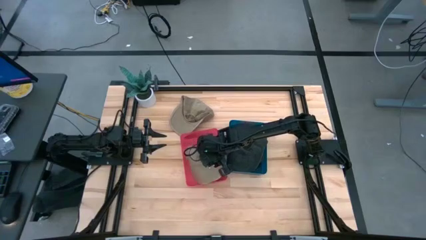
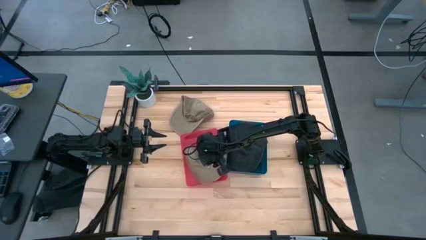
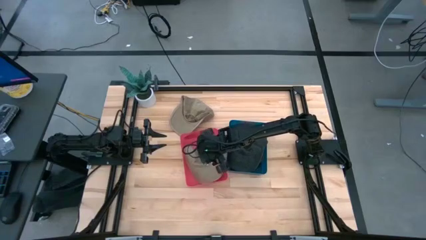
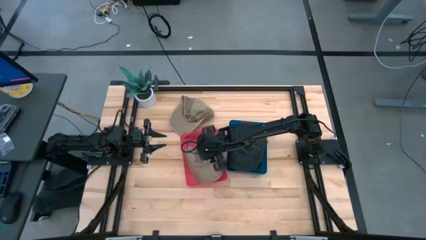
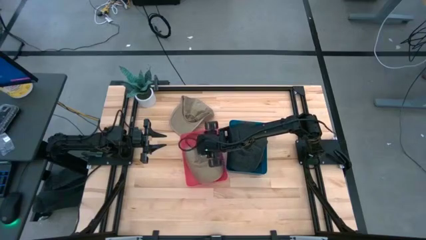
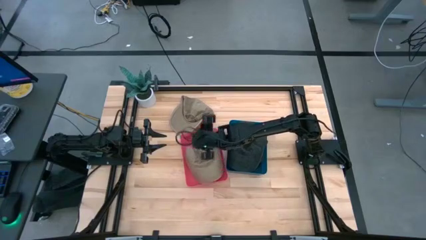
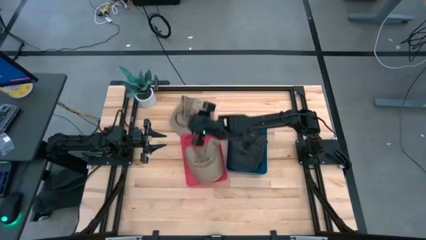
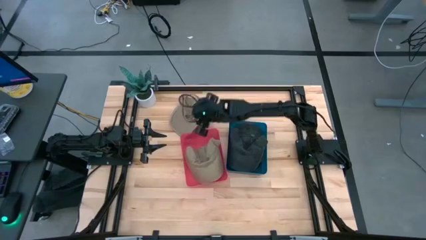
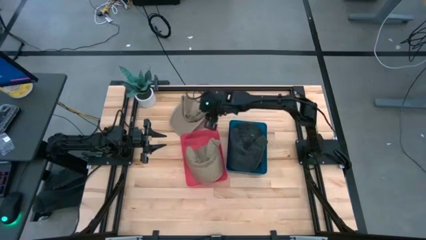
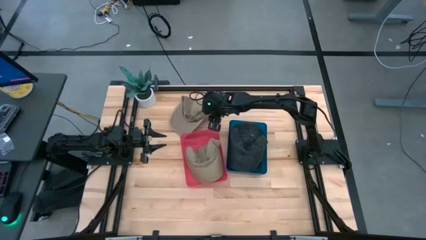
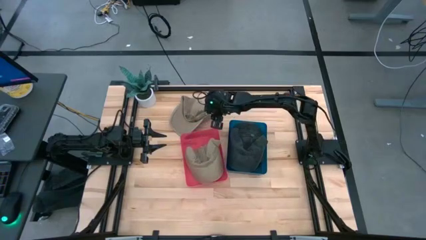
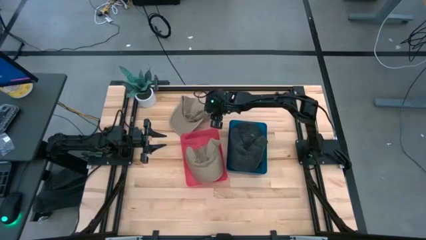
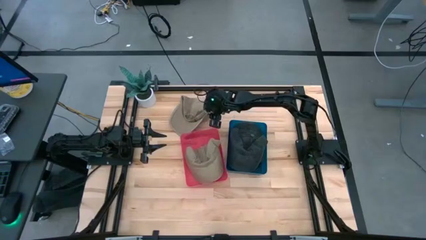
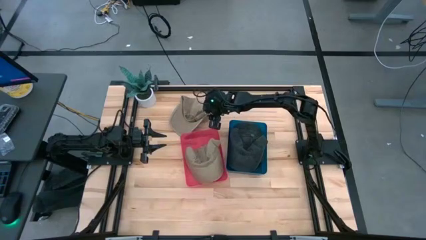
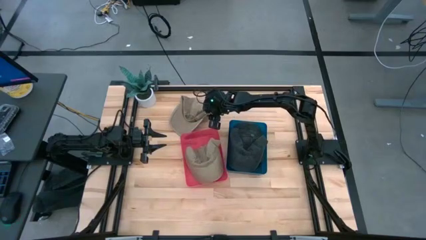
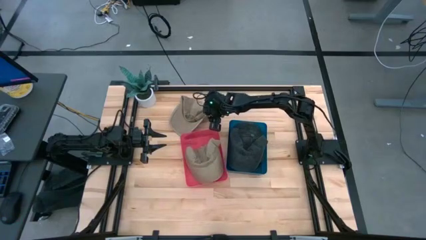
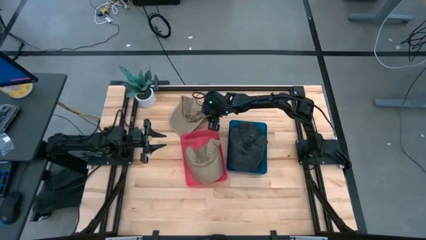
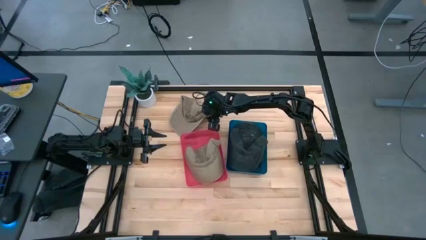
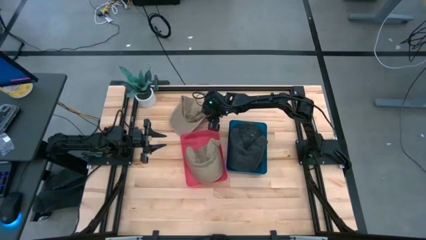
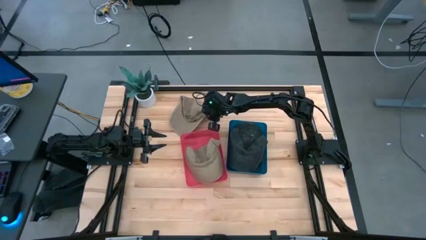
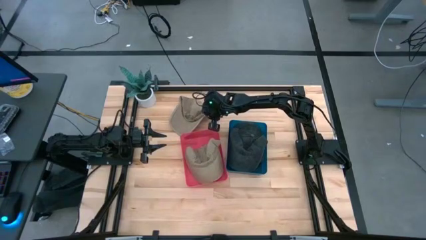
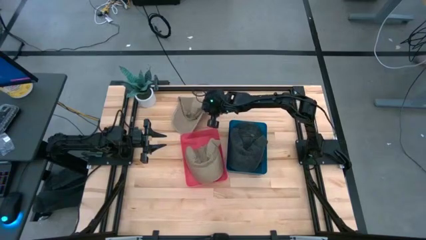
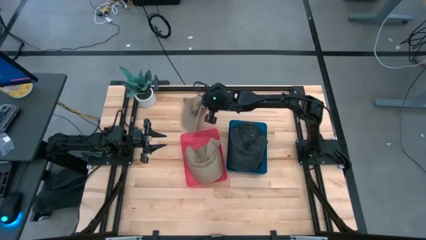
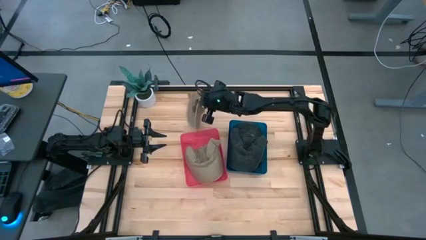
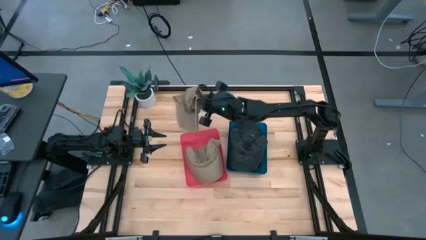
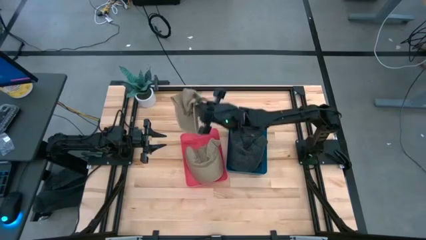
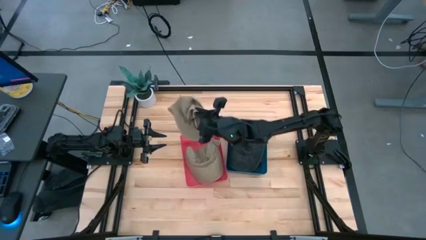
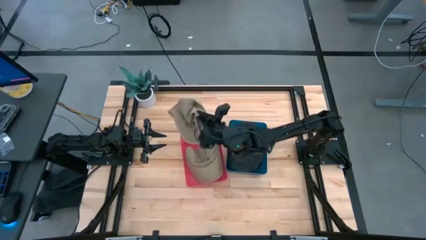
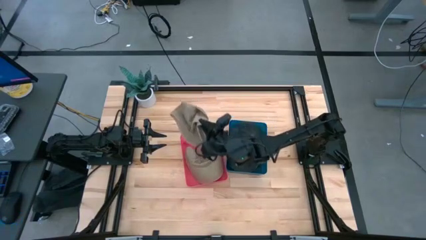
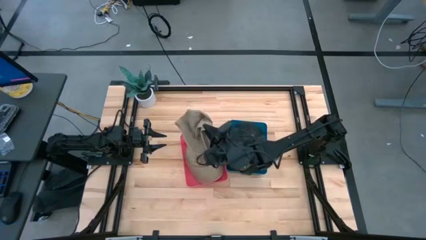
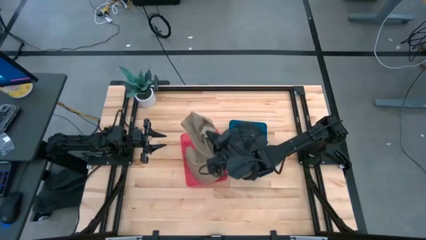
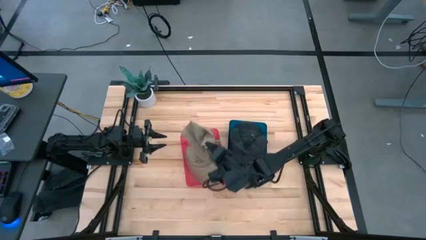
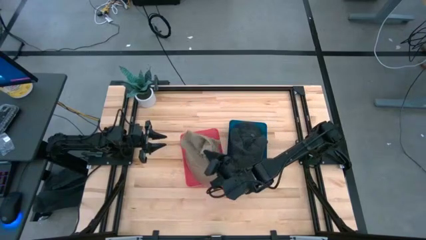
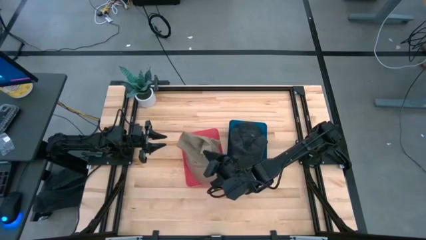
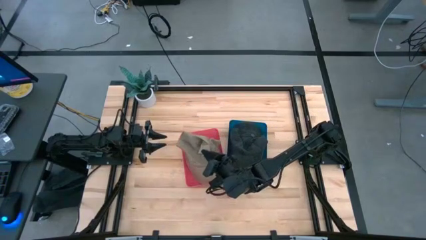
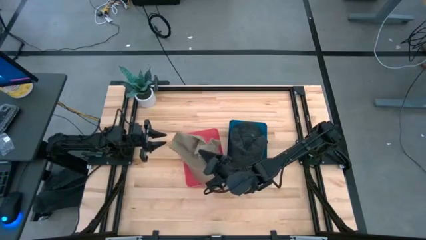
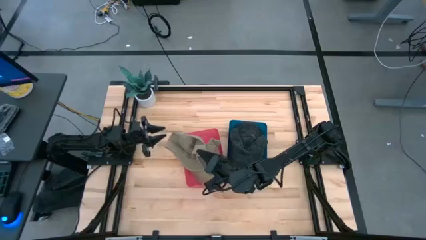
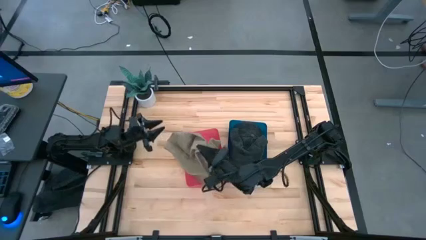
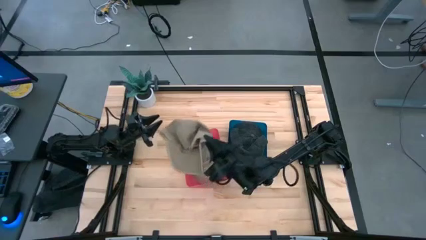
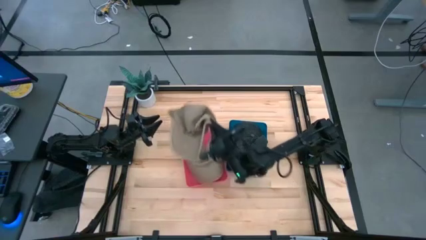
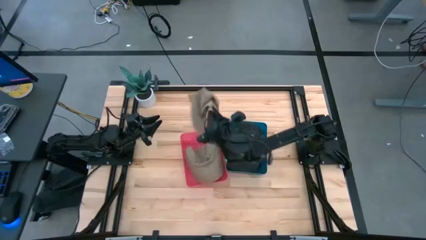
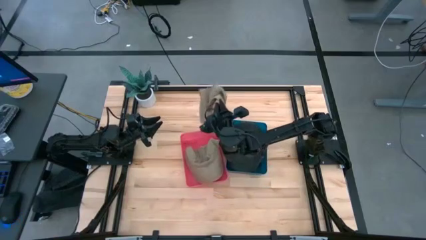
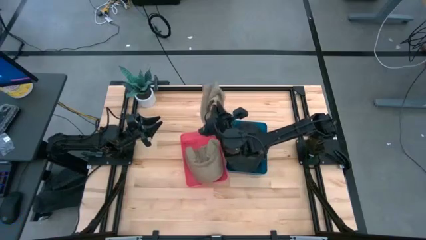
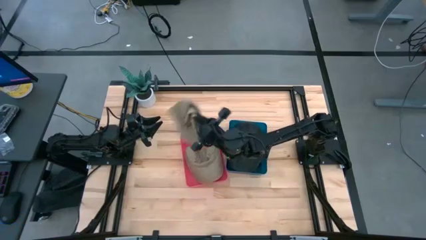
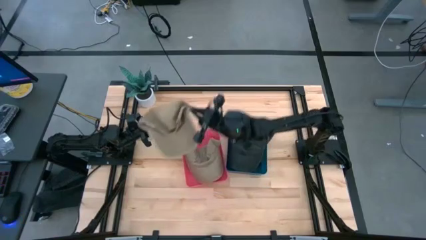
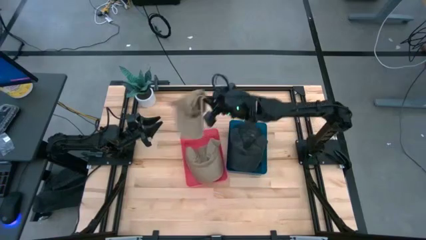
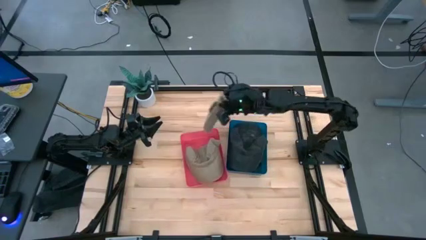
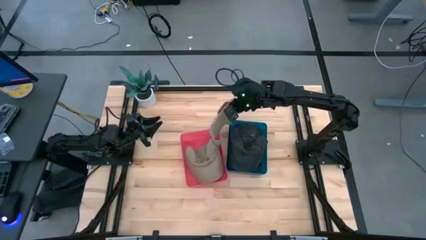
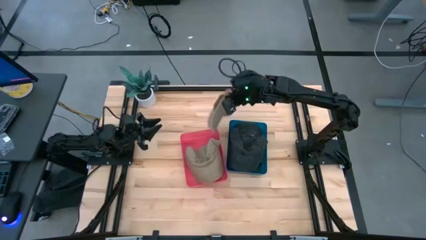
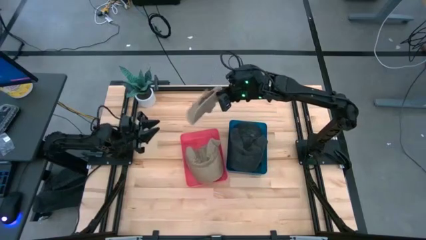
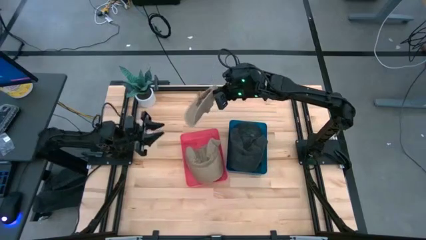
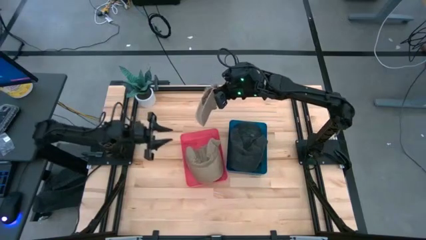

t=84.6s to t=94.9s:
Task: Pick & Place hat
Put the brown cap into the red bin
